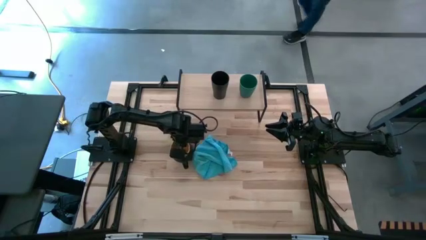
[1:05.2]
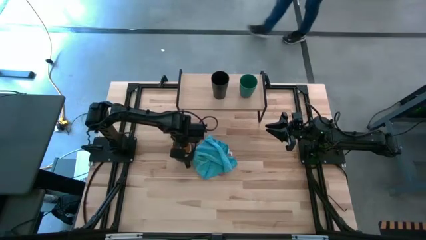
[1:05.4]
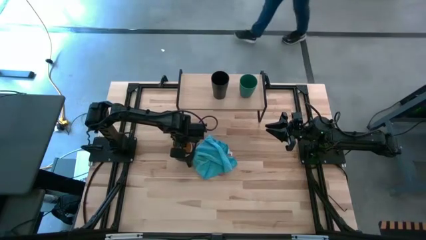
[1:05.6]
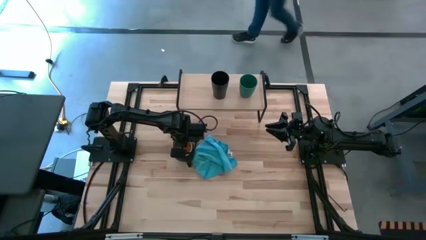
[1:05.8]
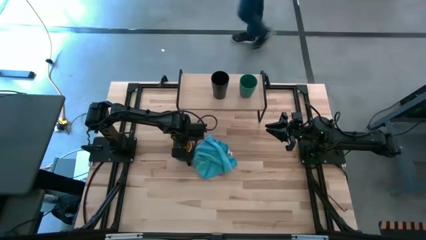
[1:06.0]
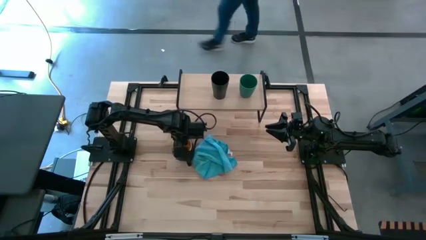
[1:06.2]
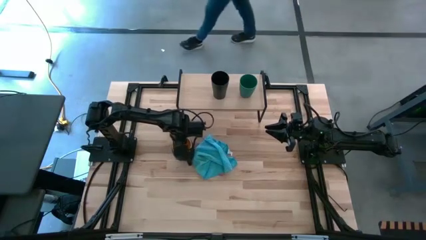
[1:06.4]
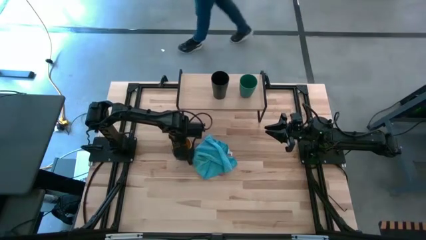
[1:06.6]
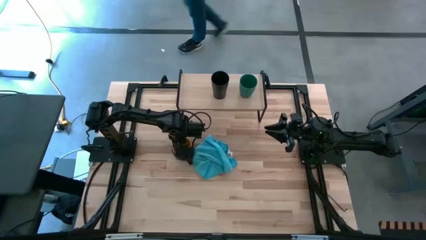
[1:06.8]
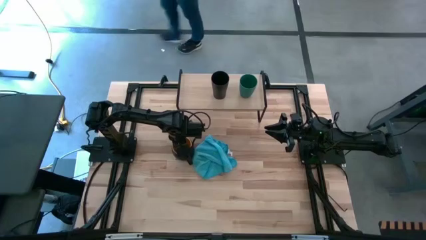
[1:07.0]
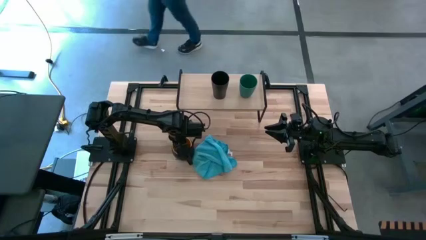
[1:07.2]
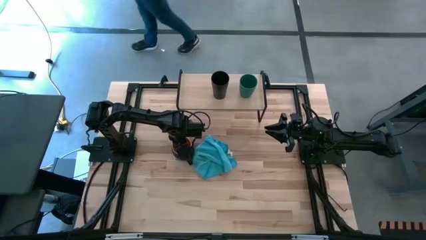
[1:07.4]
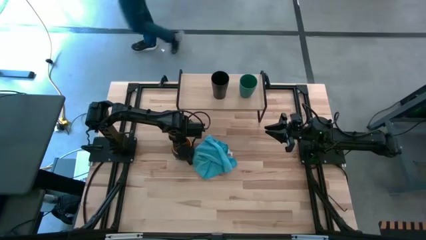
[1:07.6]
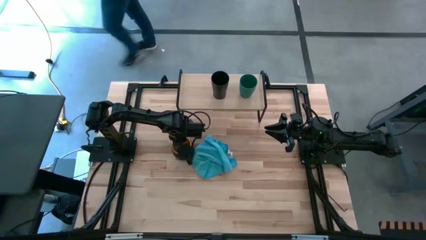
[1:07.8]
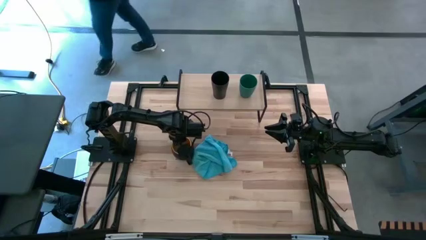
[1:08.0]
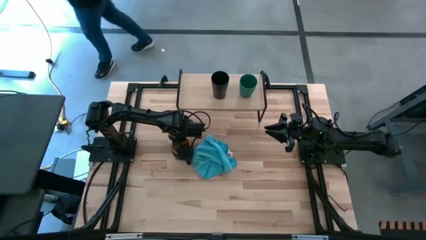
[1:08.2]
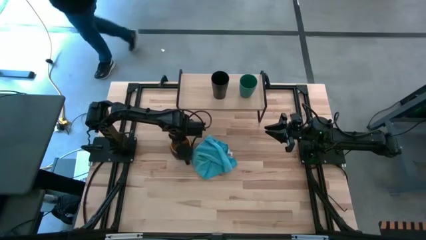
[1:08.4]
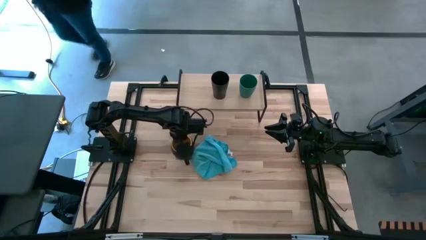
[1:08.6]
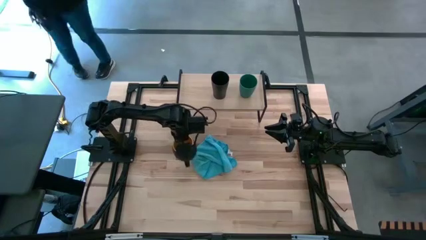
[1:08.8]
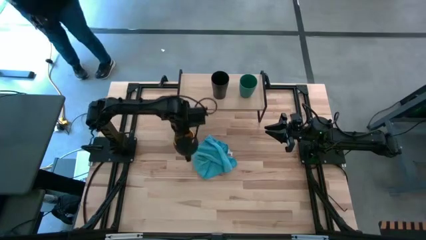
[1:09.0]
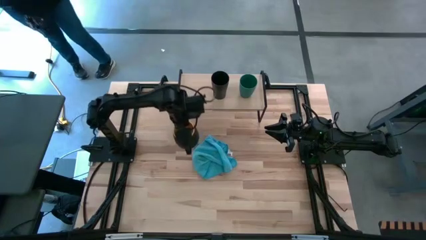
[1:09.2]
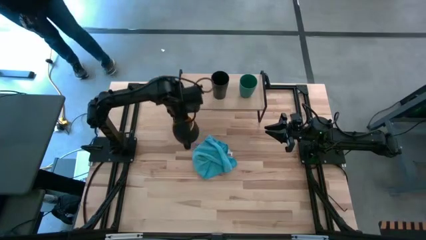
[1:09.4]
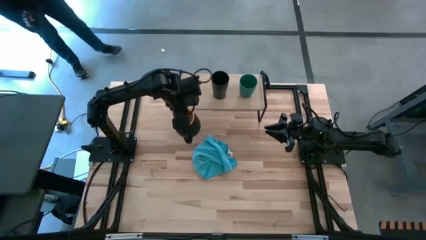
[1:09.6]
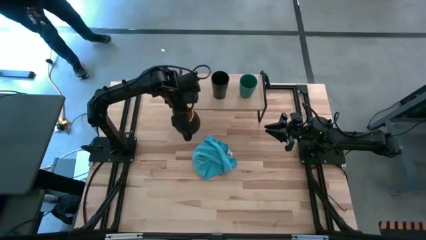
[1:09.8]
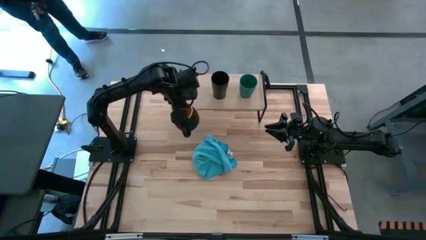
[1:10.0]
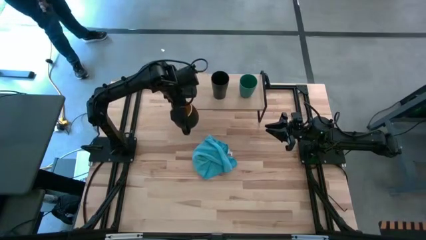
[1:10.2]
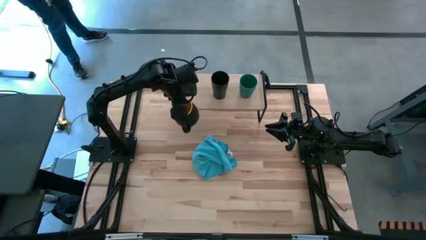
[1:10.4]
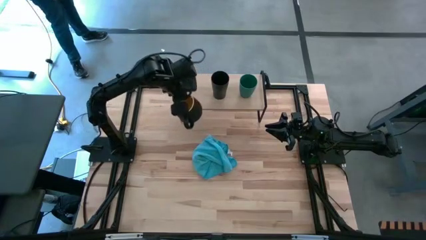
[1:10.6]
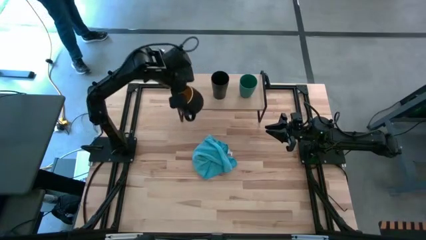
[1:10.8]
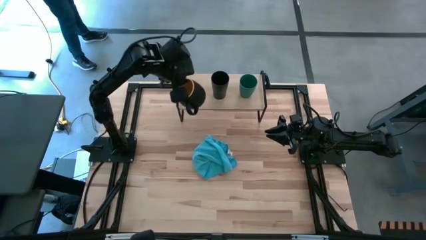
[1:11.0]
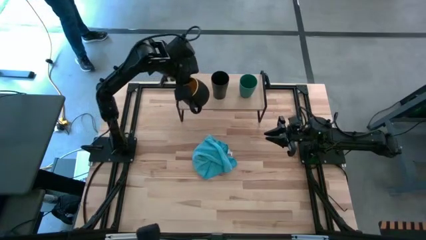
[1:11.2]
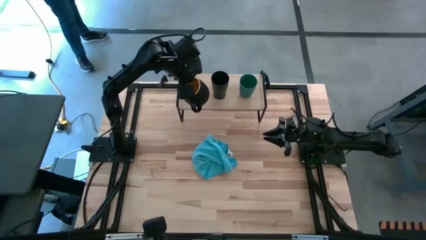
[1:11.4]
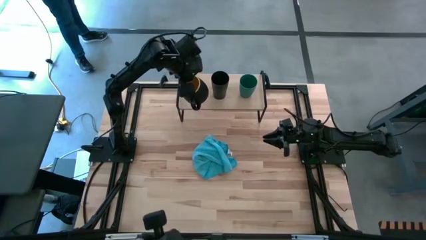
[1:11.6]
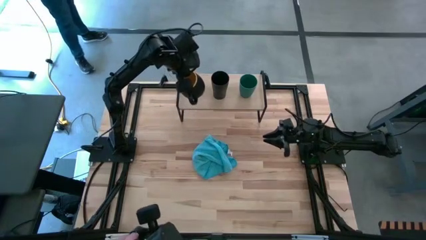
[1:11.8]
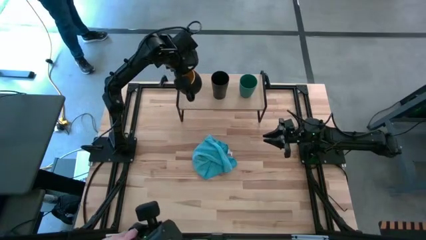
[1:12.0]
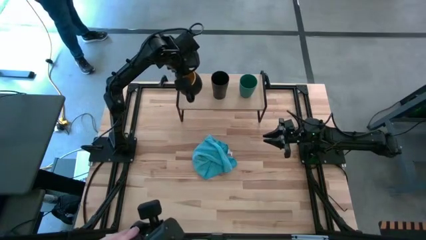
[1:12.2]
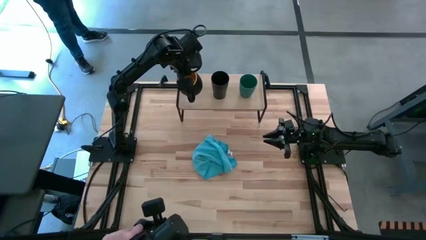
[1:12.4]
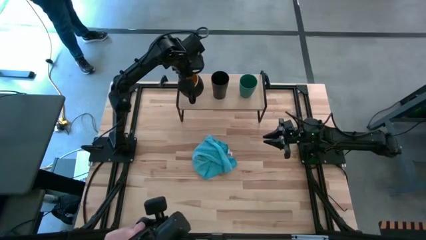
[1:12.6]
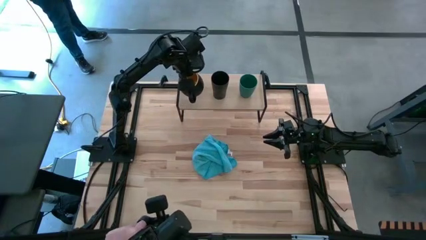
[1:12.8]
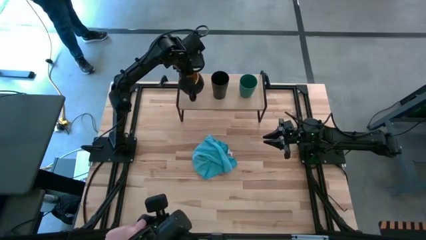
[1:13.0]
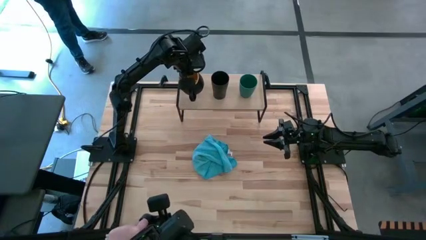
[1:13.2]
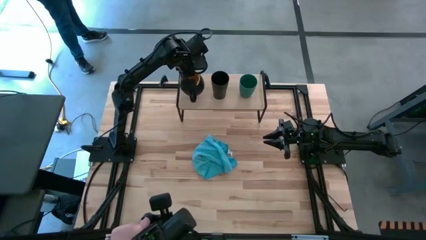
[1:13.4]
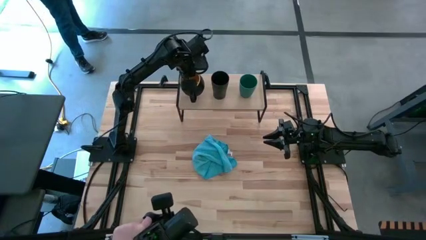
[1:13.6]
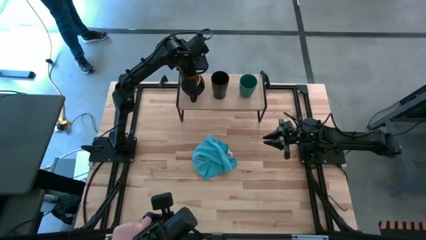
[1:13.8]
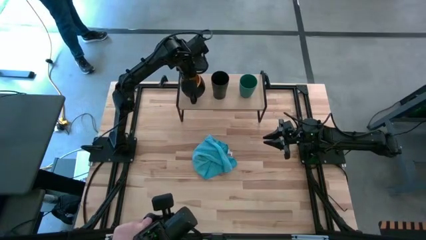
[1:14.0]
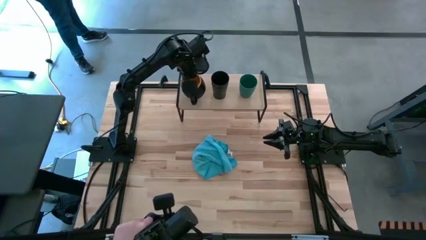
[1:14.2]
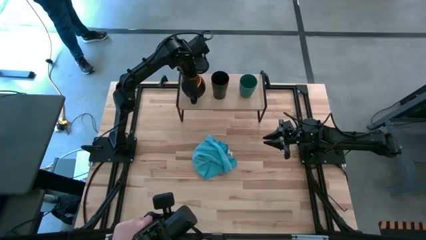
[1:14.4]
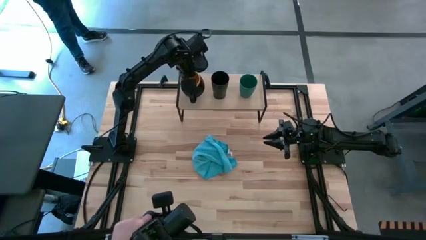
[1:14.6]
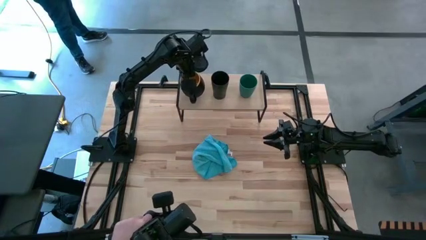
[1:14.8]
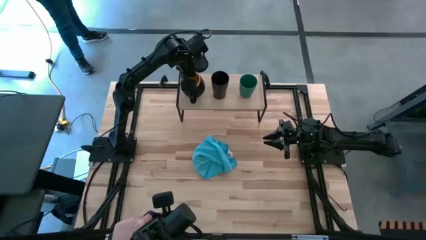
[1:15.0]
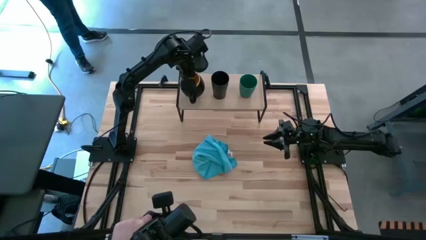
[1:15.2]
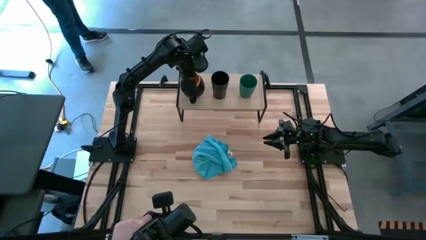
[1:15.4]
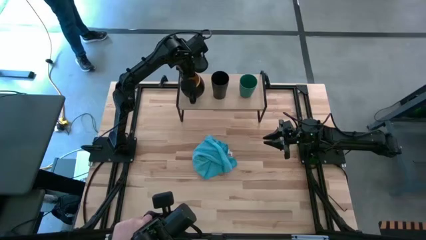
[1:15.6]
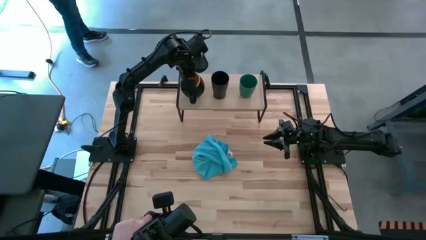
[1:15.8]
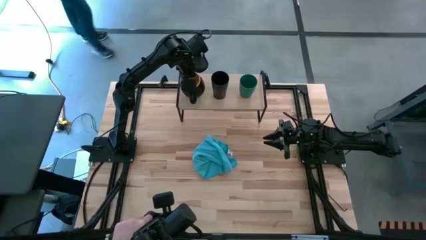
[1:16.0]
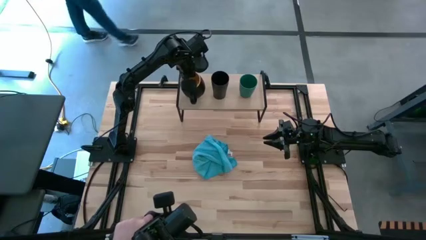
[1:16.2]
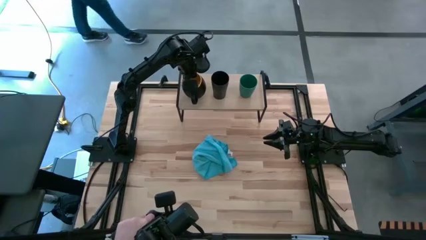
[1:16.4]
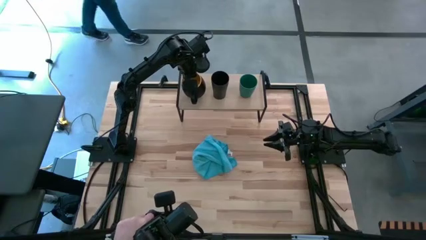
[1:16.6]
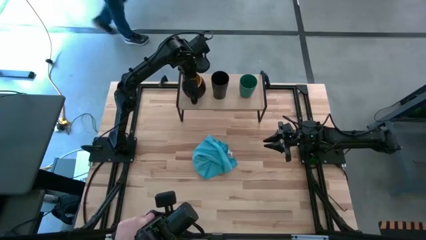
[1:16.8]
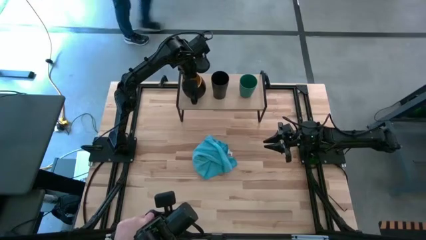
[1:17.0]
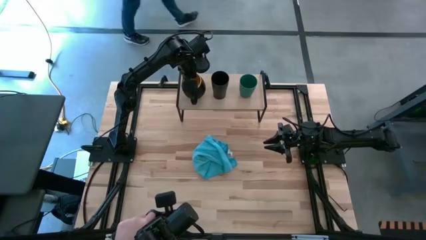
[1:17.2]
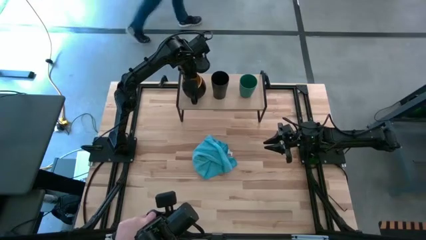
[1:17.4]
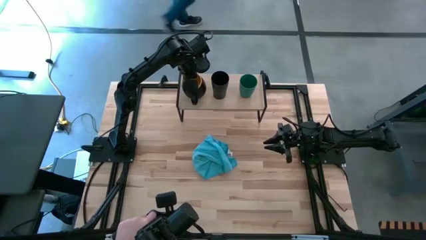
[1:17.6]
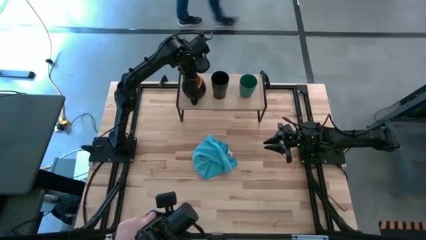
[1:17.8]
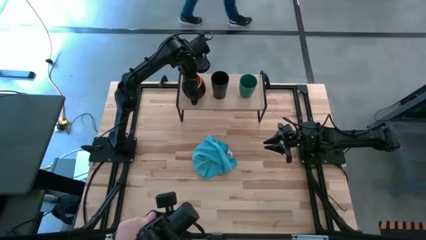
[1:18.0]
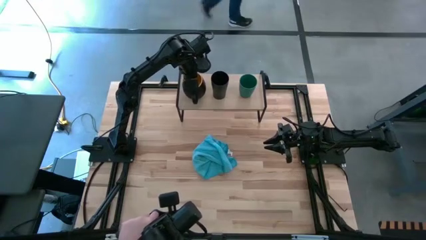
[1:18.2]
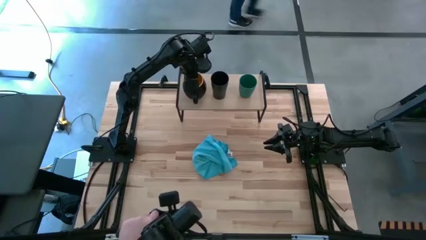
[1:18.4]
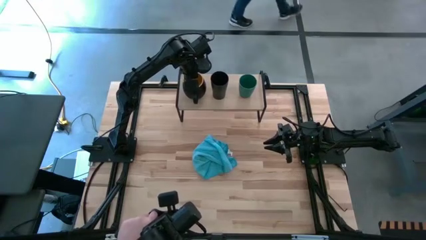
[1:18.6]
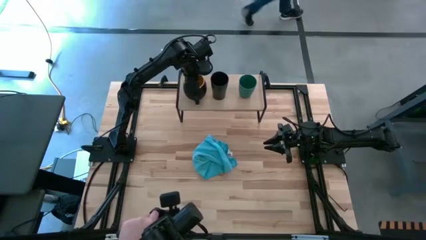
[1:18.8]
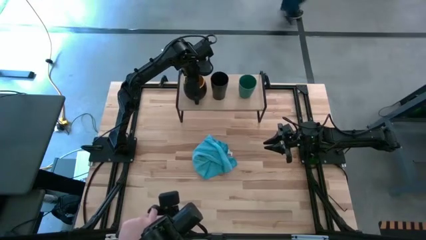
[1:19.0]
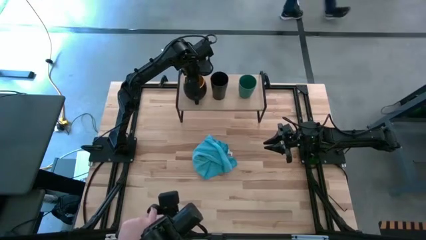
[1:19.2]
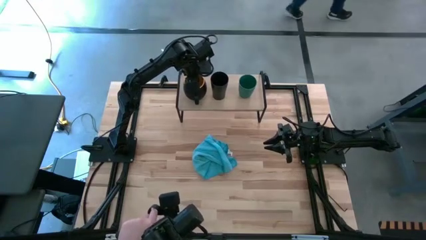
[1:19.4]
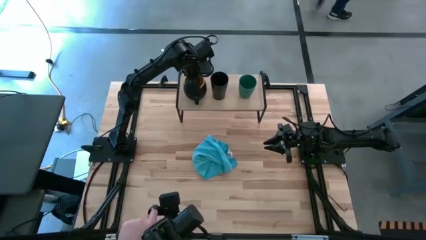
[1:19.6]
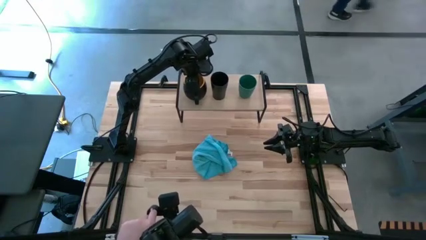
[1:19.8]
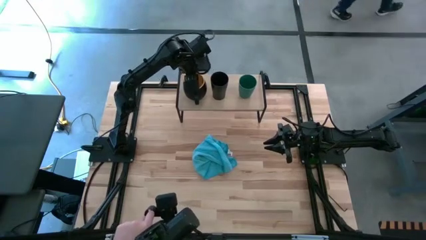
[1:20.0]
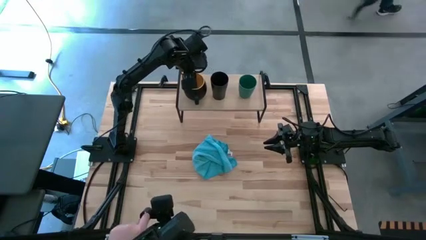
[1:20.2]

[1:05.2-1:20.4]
Task: Stack small to large cups/mugs on shelf
Put the black mug on the shelf

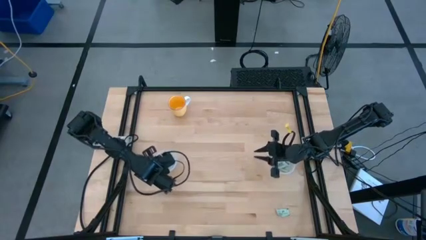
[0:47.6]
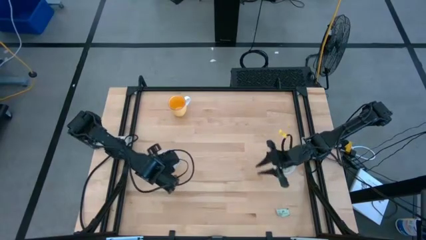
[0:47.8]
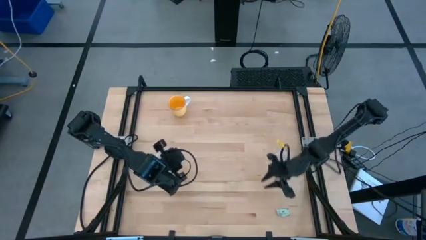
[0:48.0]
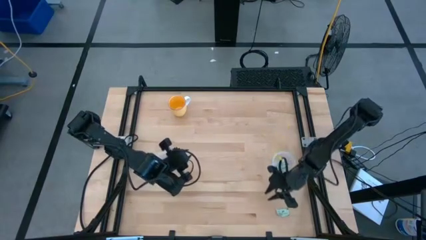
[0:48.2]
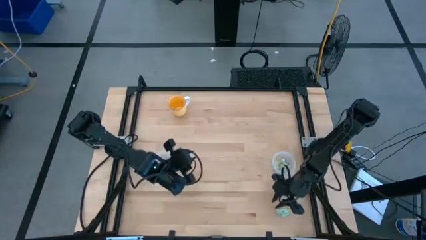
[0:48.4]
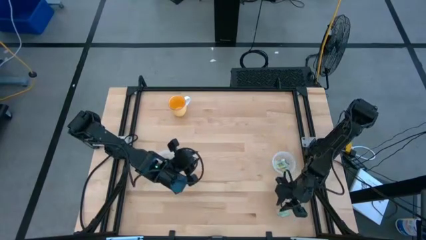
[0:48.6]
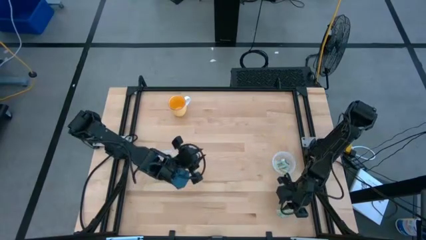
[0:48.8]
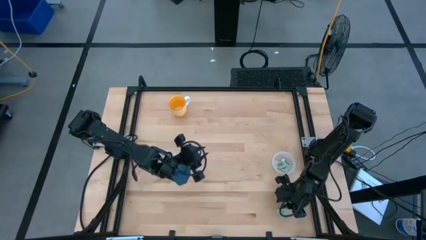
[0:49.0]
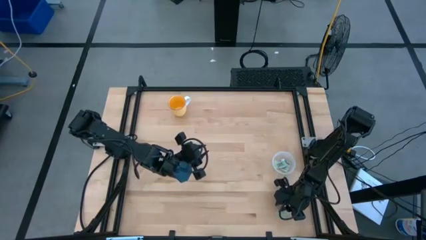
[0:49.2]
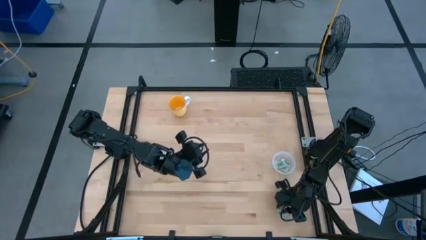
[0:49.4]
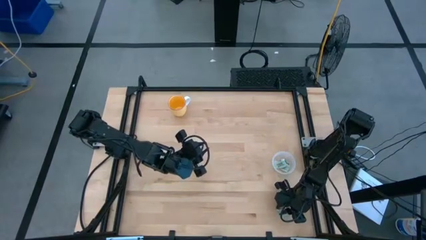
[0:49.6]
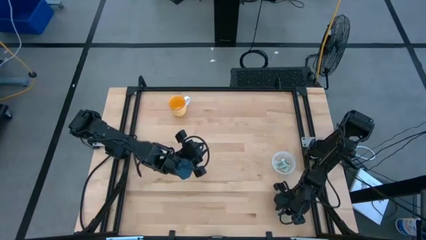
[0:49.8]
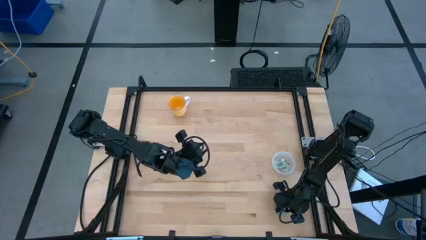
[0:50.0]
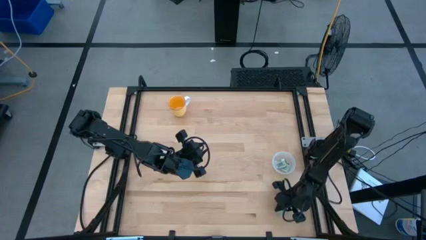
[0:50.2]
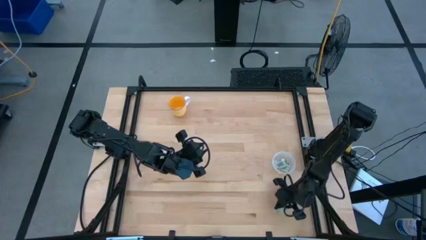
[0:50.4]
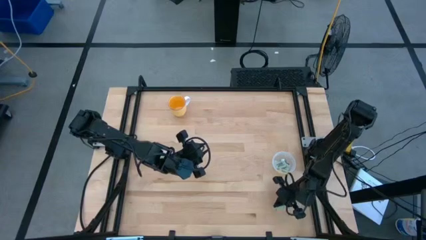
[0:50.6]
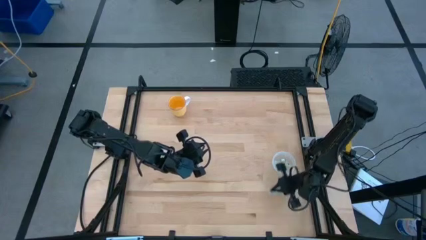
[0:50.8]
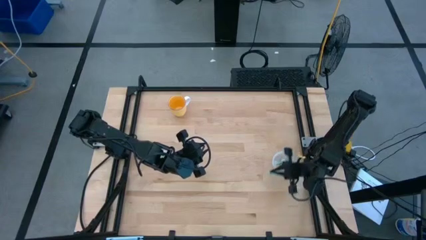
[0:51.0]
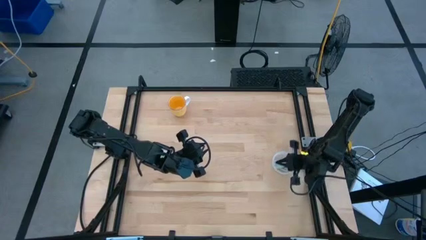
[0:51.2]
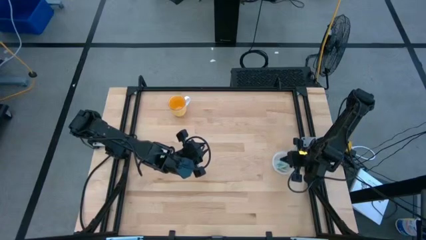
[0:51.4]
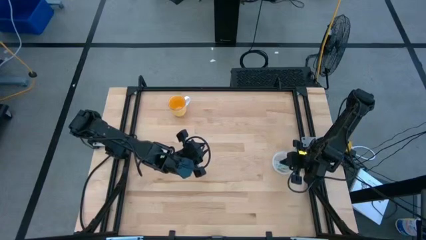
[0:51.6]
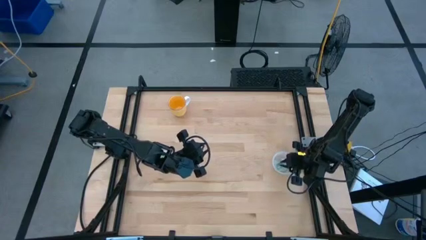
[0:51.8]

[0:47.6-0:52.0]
Task: Pick and place items into bin
Put the stevia packet into the right transparent bin
